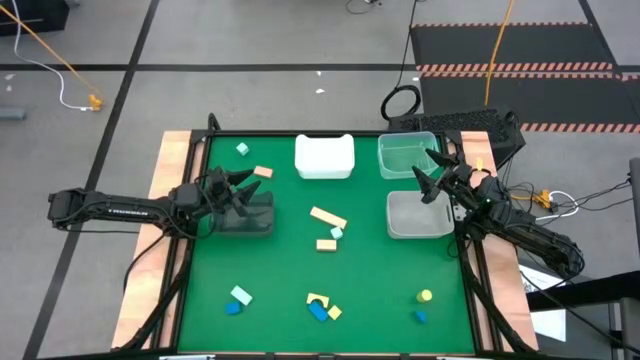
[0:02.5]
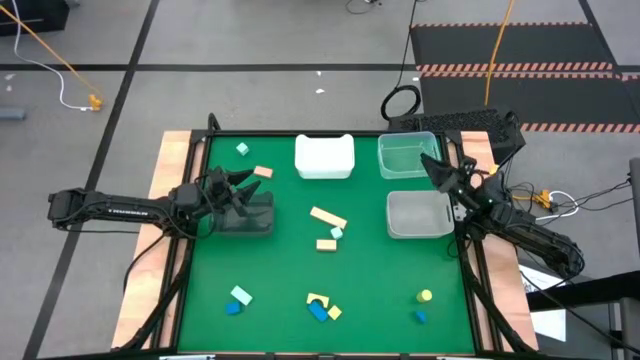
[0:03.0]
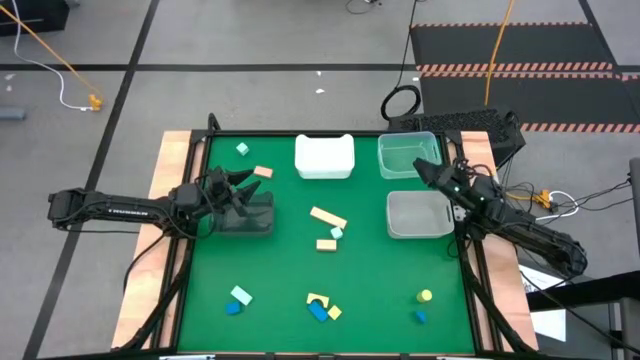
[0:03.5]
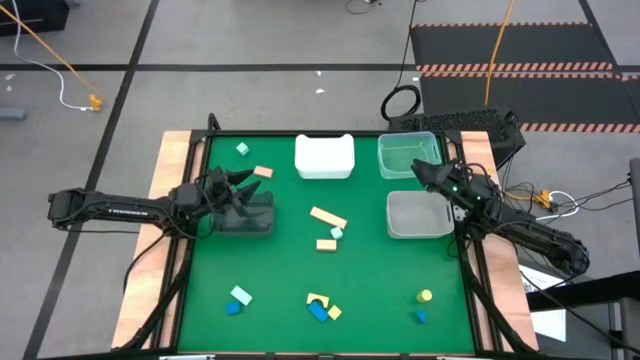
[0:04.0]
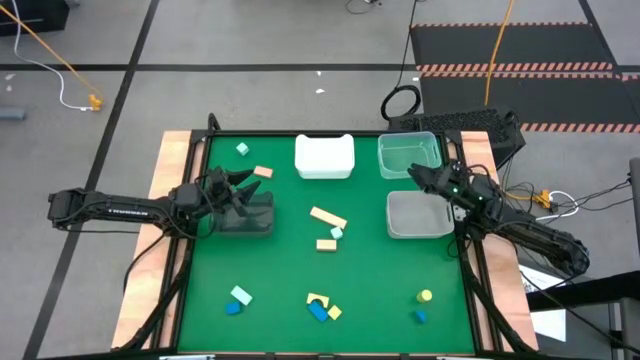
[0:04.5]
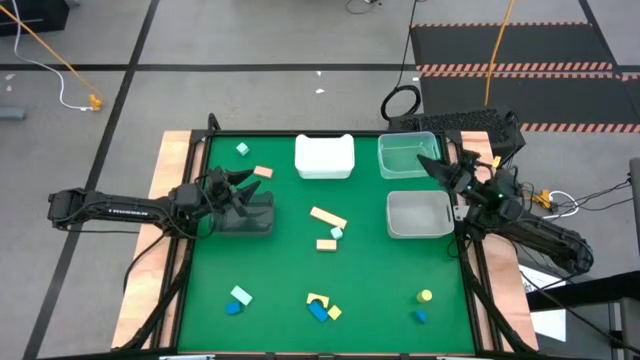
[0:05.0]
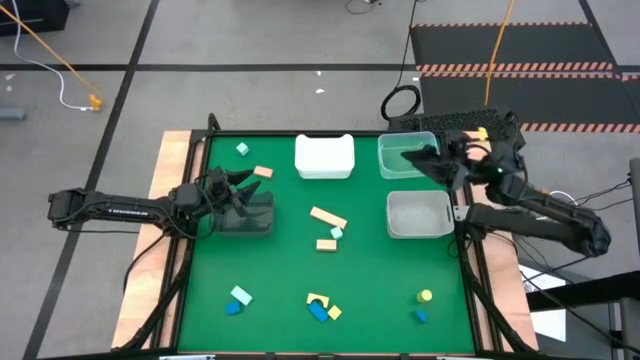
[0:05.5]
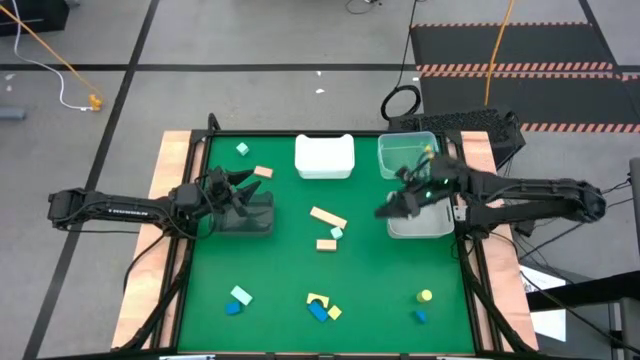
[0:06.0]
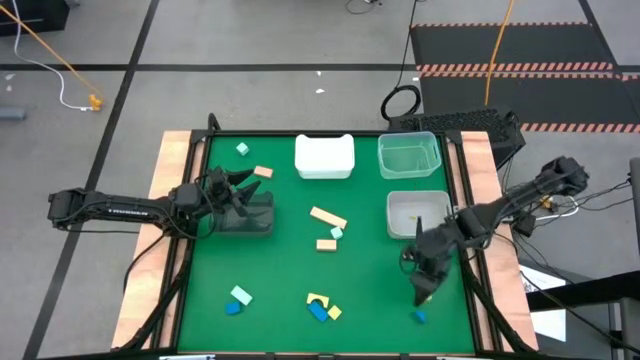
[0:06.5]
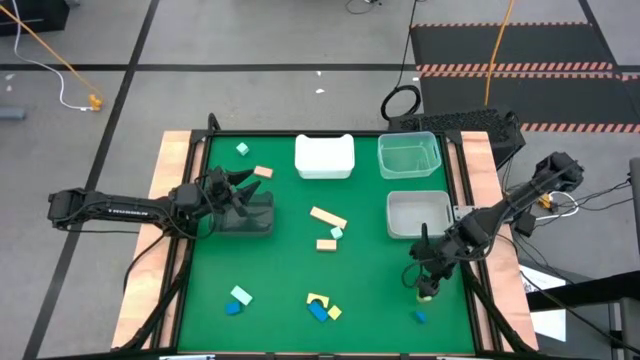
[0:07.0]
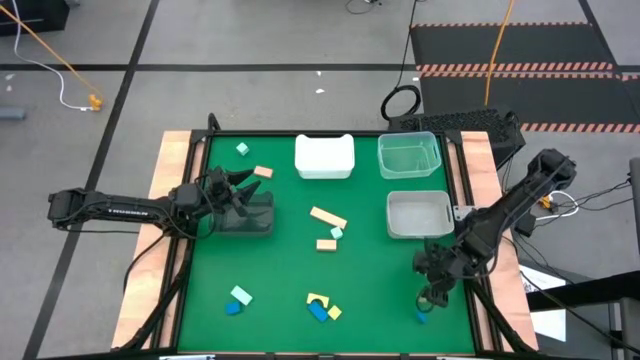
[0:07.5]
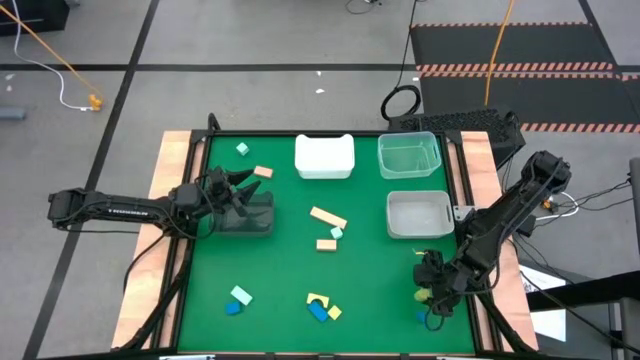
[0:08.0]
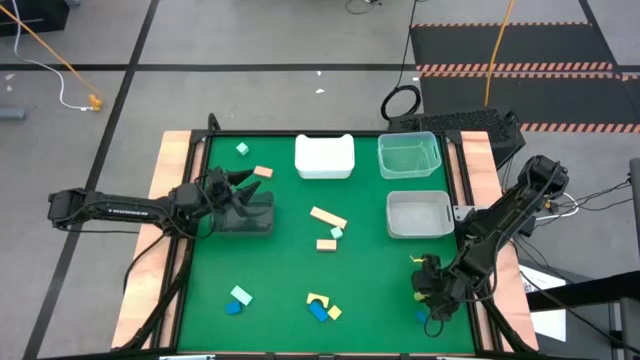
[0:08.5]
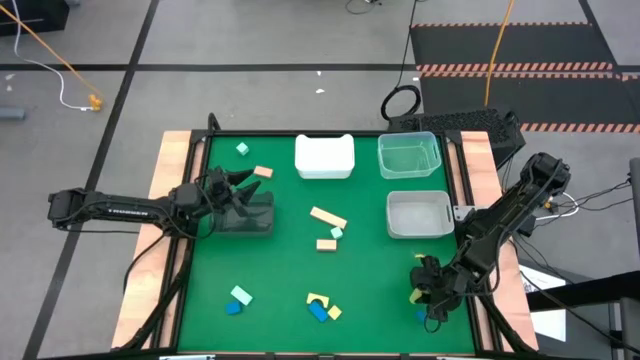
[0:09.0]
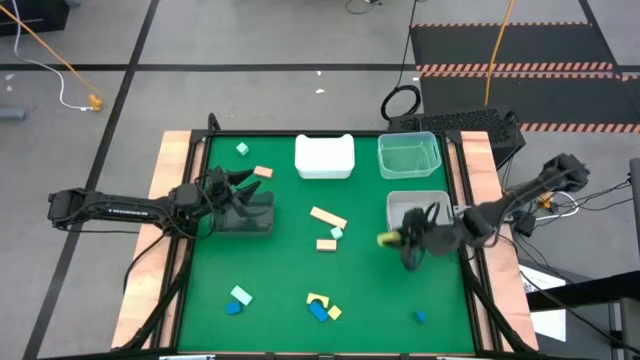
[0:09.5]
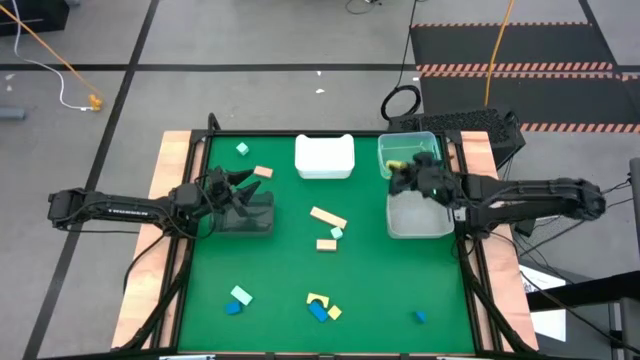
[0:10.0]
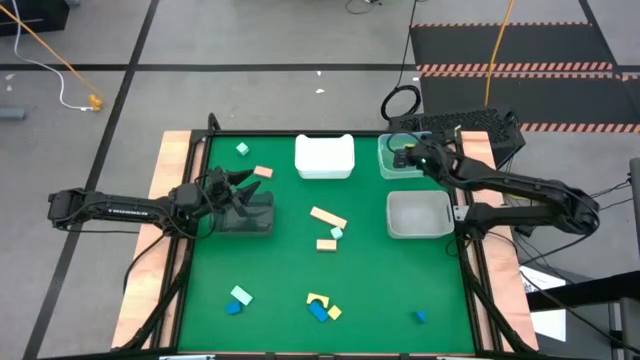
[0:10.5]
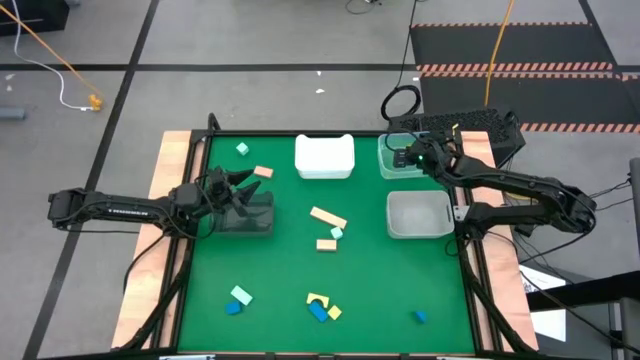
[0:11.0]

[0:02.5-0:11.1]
Task: Sort & place blocks by color
Put the top right green block into the transparent bin

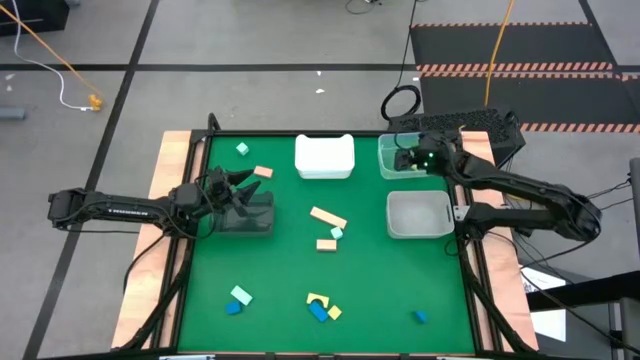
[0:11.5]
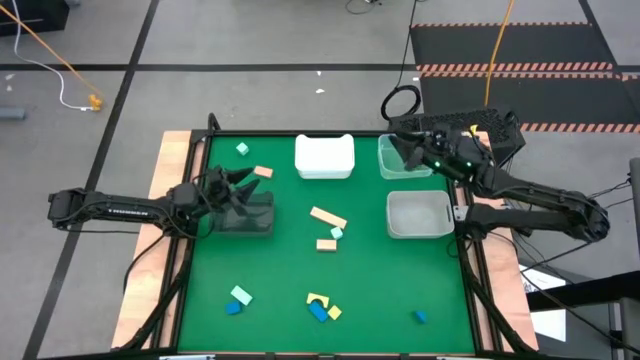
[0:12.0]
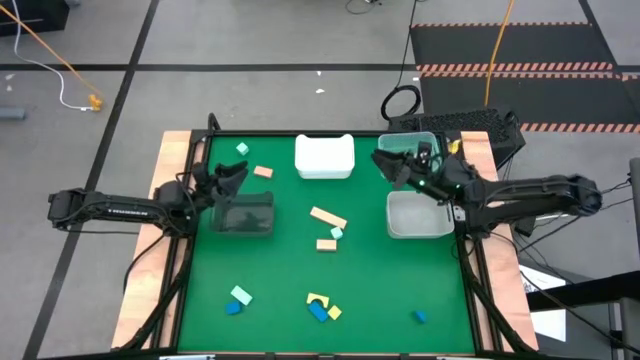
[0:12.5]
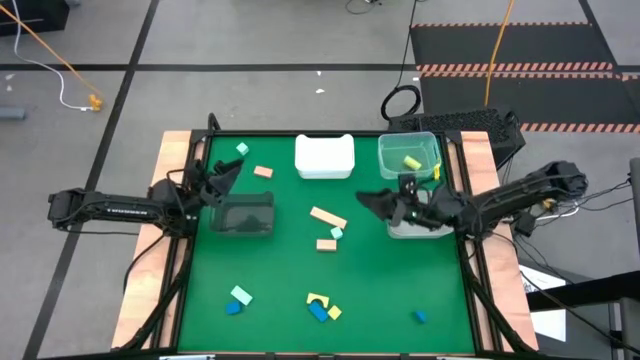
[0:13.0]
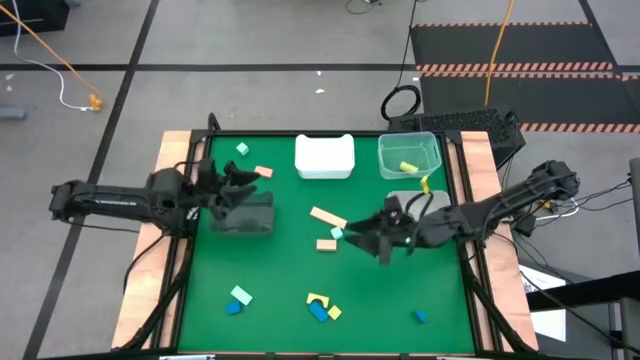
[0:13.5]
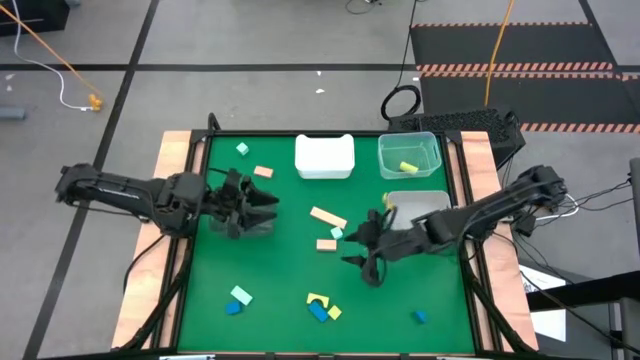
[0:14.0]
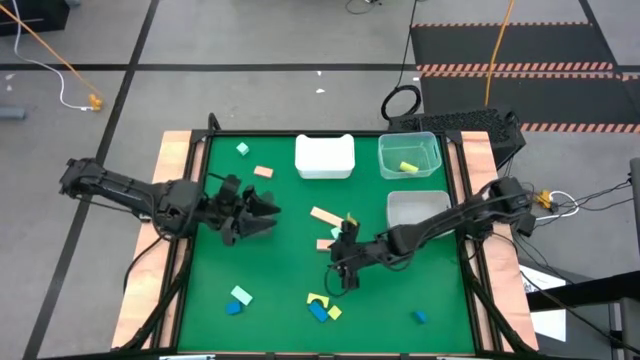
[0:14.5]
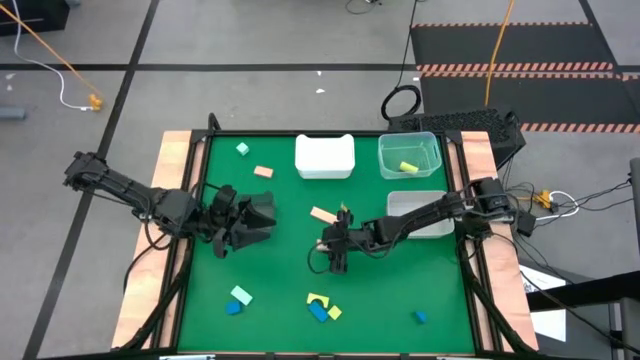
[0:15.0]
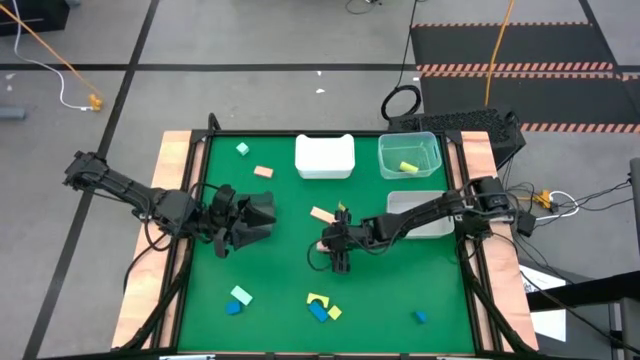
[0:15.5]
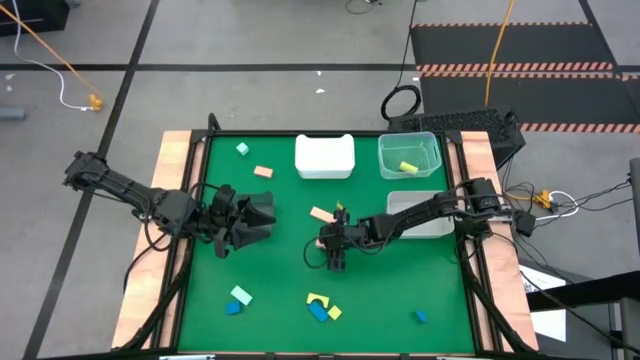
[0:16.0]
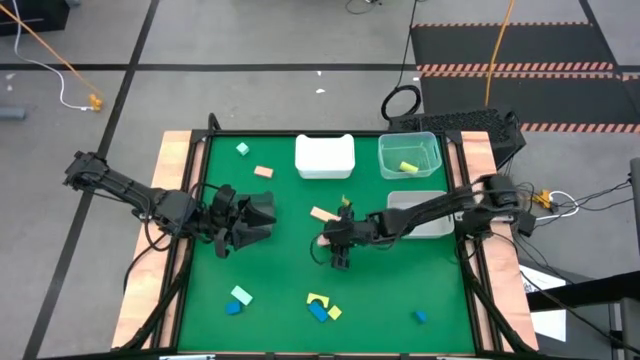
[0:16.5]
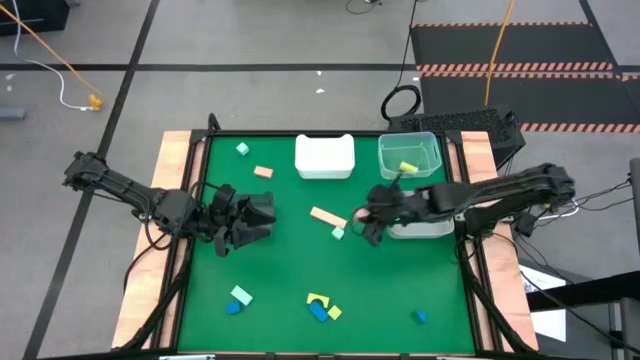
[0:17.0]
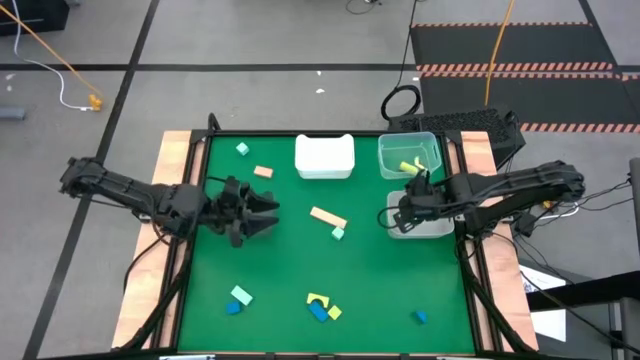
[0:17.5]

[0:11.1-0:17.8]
Put the bottom brown block into the gray bin

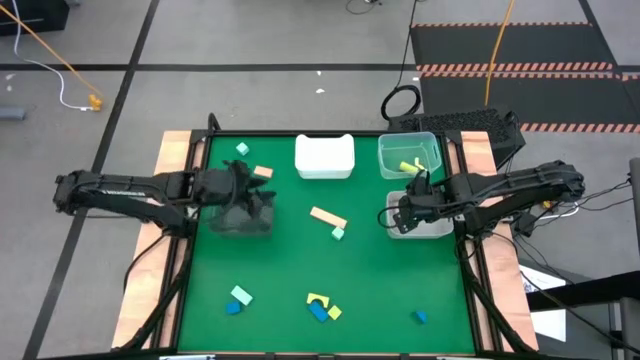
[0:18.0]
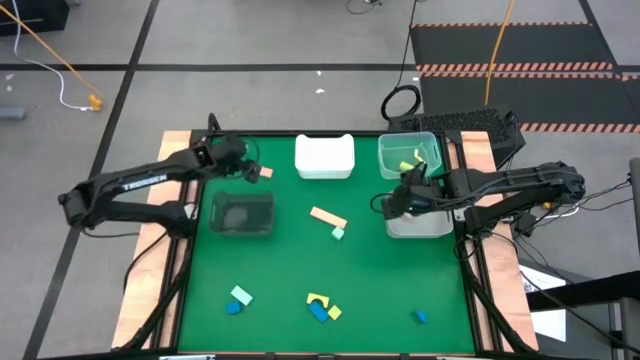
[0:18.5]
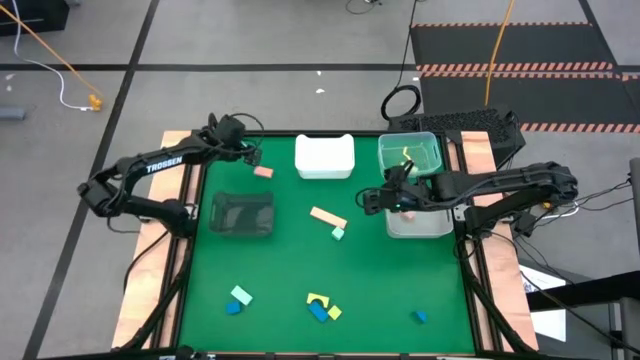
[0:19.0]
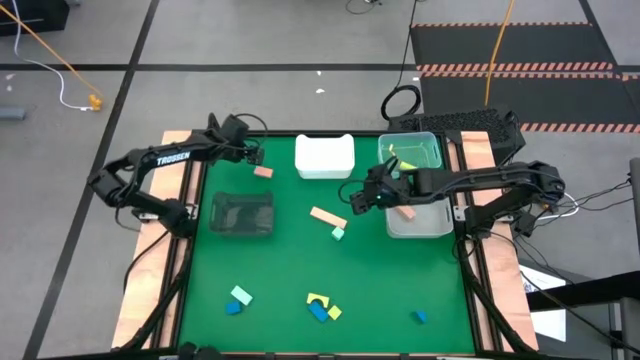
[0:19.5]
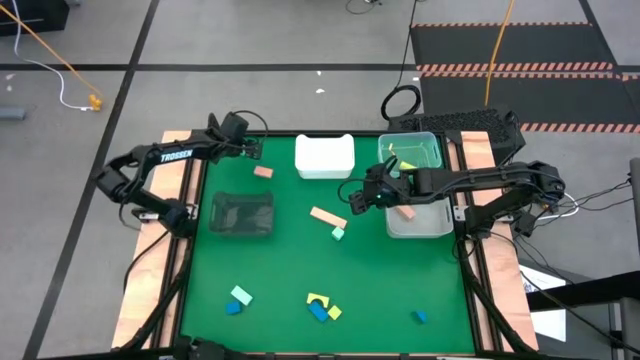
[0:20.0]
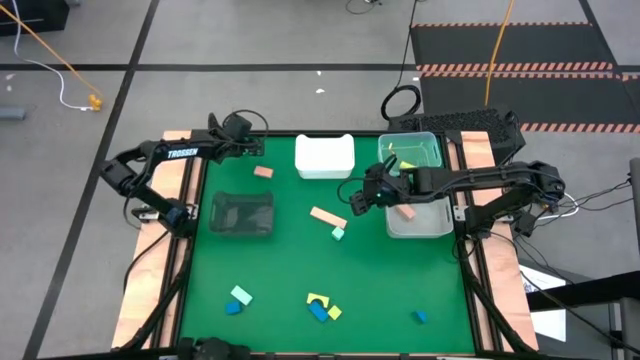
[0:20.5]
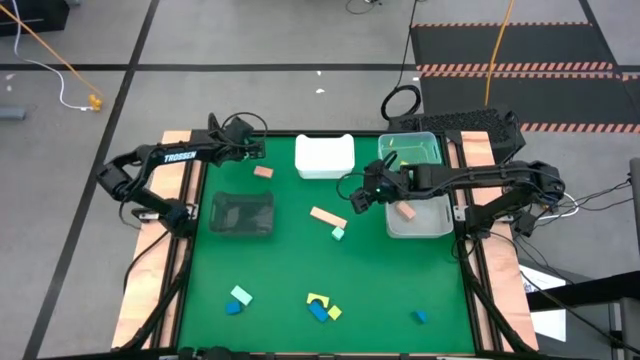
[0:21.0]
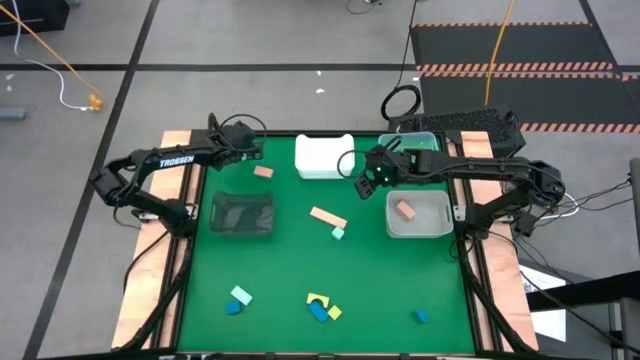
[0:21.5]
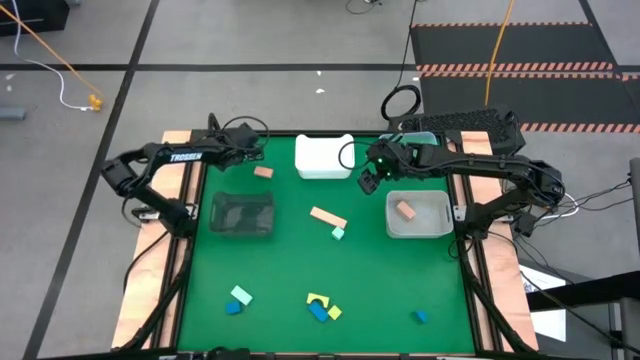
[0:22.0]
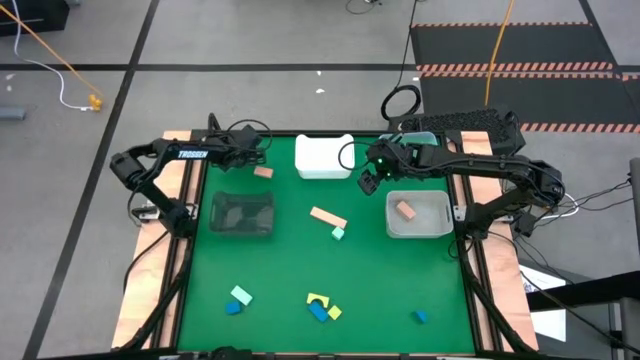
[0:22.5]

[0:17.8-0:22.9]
Put the top light blue block into the black bin
